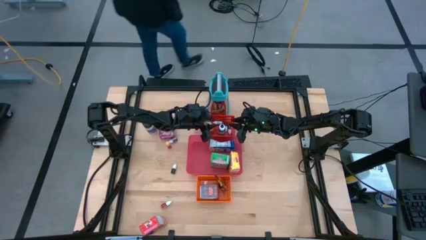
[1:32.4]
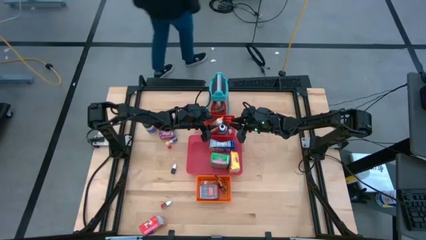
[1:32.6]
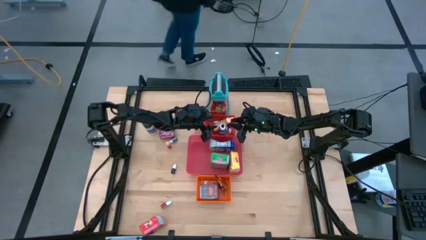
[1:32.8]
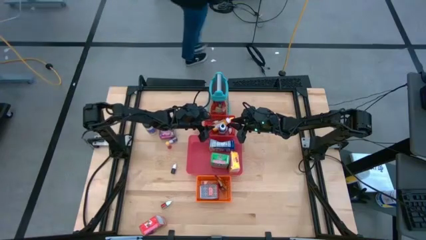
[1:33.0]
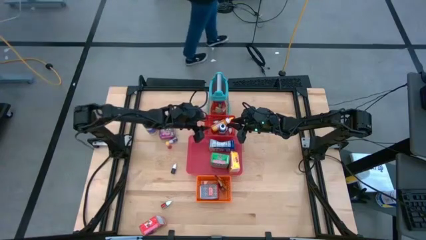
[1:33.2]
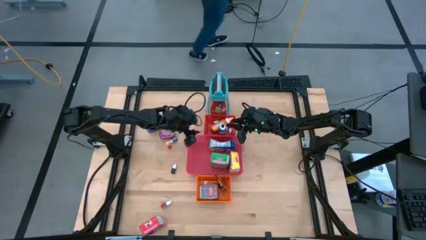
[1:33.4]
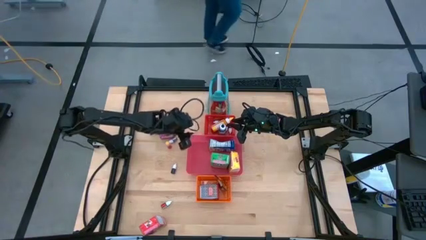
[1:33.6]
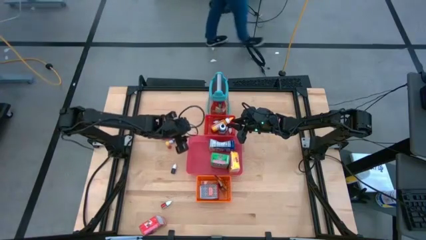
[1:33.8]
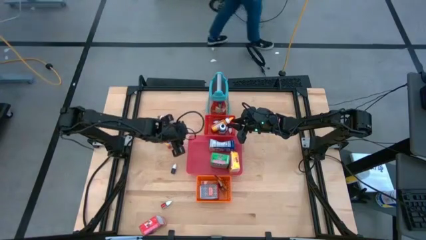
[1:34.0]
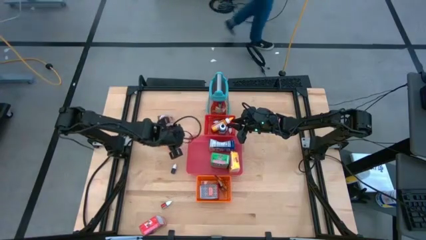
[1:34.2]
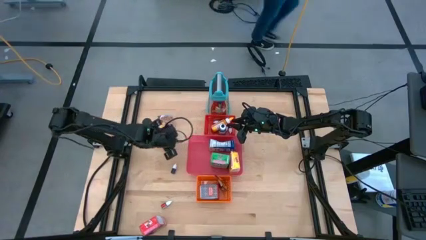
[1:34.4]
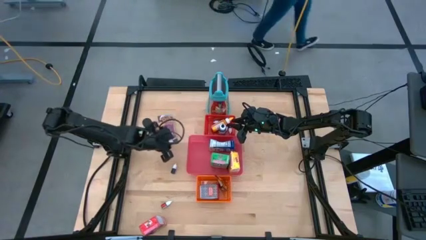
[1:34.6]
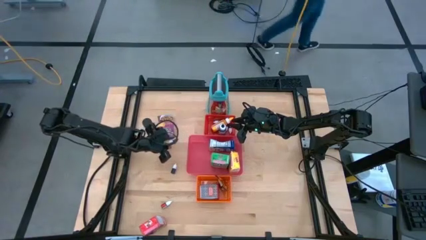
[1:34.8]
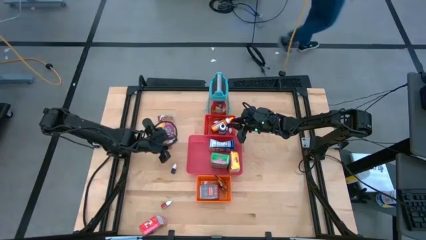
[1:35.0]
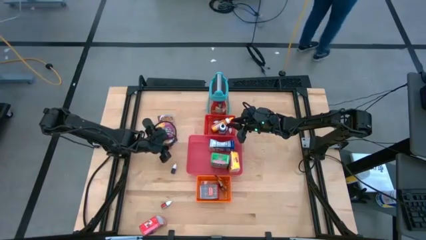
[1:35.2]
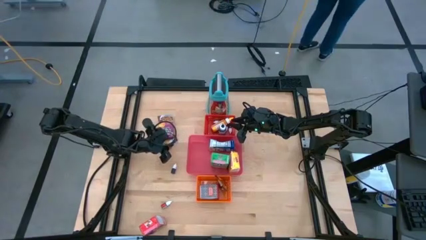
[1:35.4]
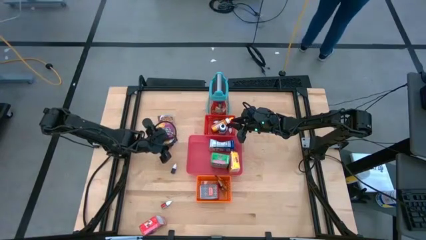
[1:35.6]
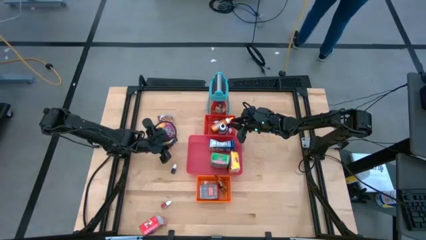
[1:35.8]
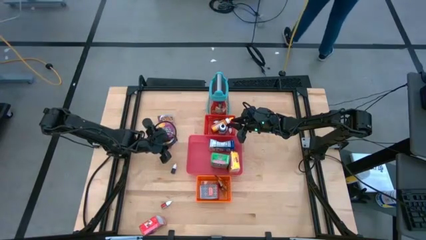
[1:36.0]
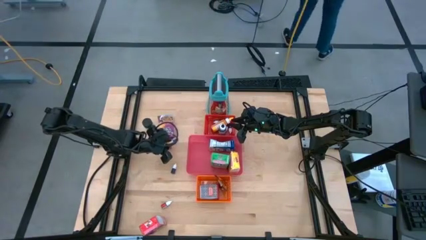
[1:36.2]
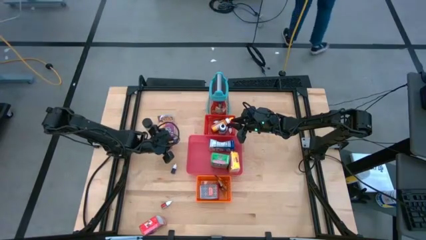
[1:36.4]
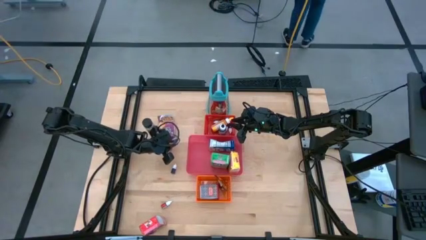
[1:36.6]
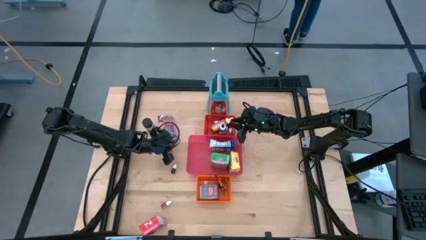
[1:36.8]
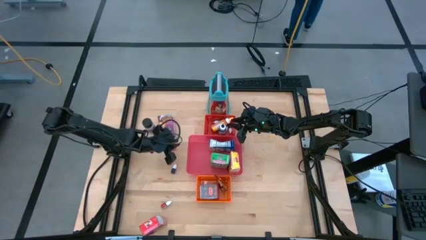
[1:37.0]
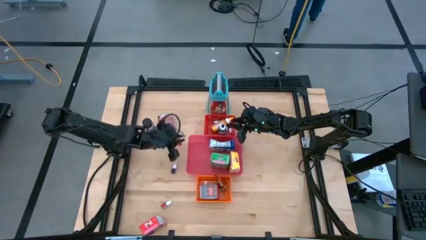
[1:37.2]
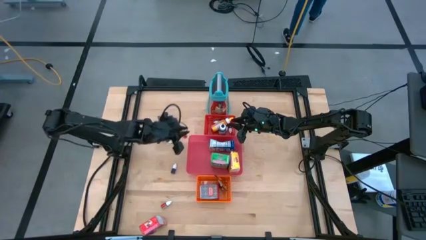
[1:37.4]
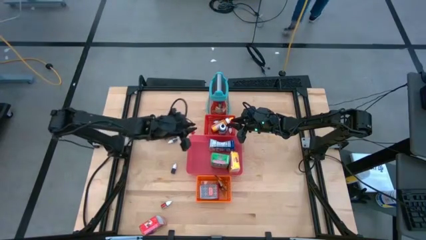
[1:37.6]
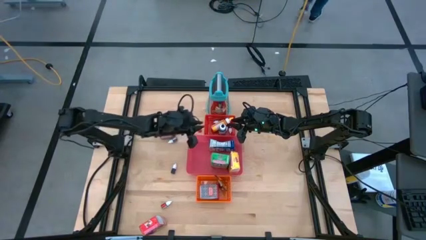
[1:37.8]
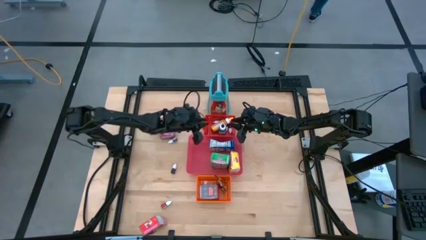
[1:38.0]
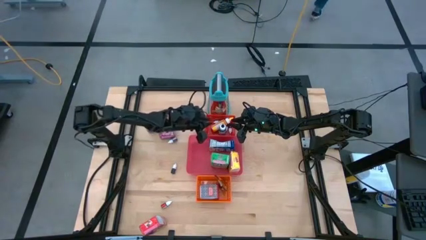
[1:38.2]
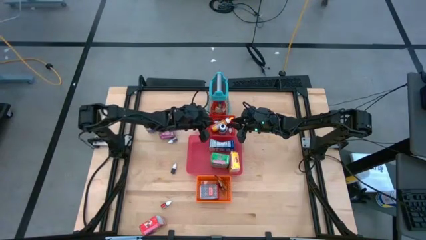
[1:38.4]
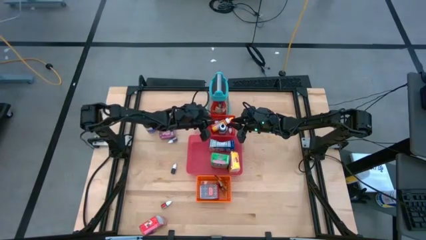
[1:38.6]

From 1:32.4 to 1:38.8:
Task: Pick & Place Kitchen Items
Put the orange food coloring bottle into the red bin
